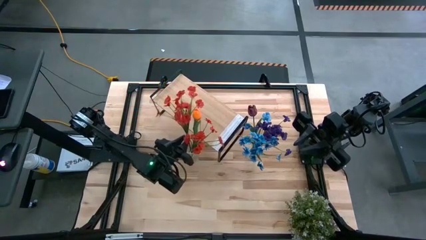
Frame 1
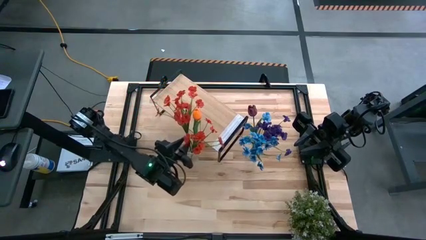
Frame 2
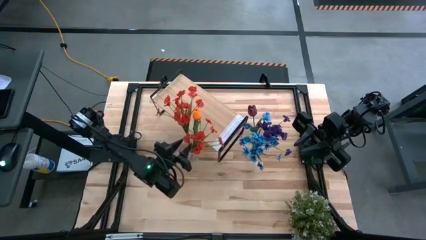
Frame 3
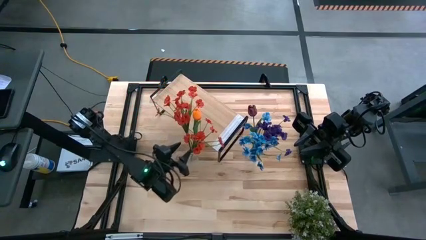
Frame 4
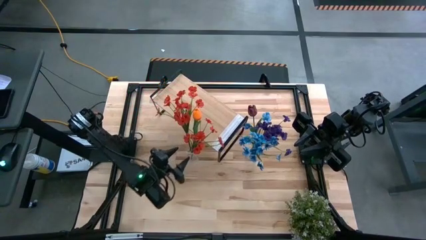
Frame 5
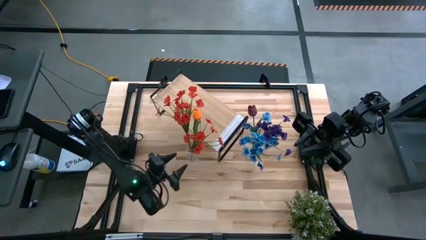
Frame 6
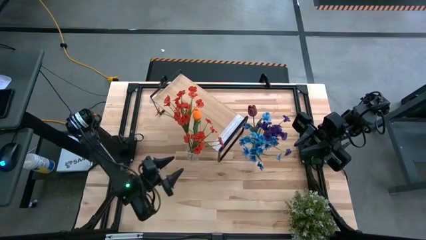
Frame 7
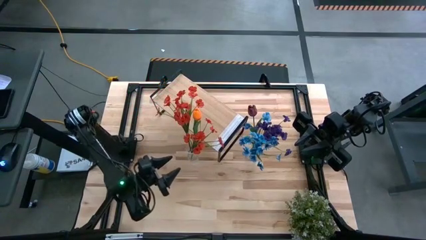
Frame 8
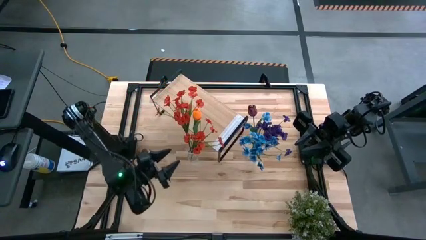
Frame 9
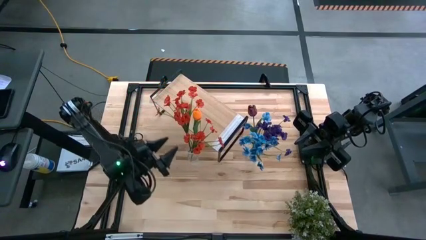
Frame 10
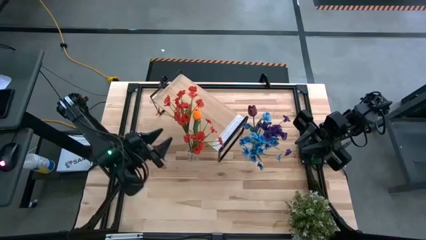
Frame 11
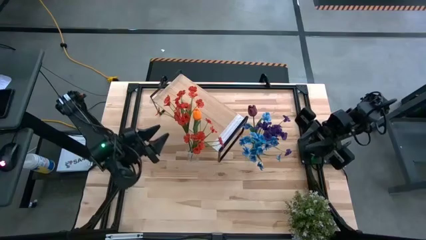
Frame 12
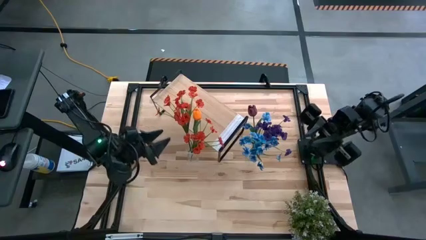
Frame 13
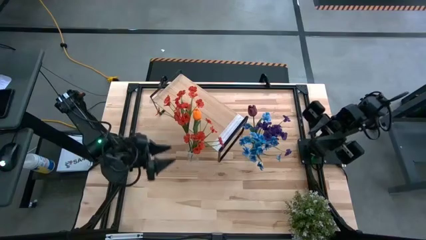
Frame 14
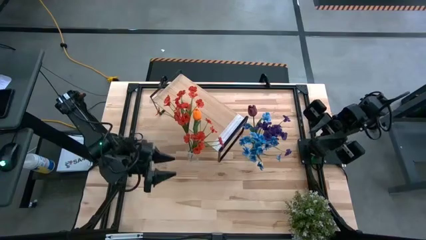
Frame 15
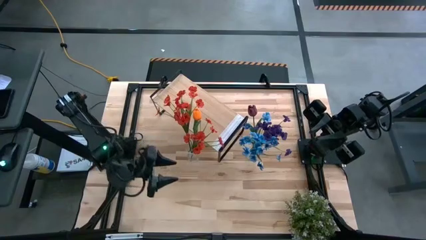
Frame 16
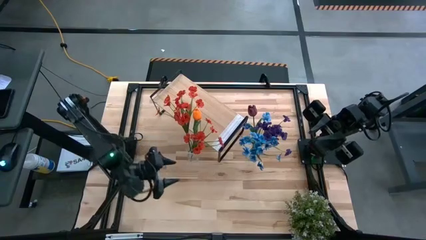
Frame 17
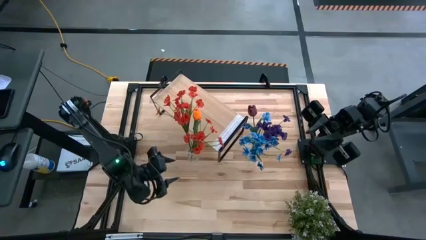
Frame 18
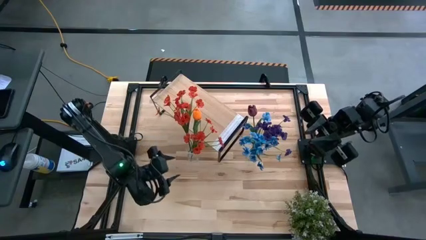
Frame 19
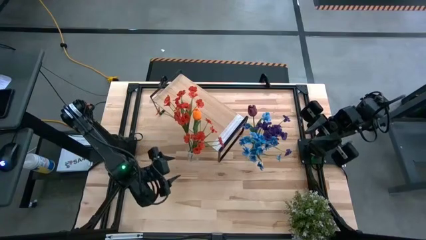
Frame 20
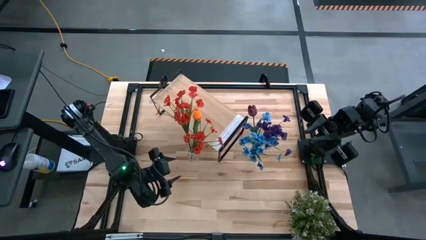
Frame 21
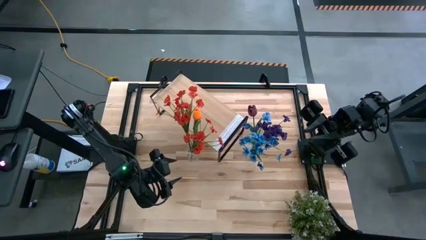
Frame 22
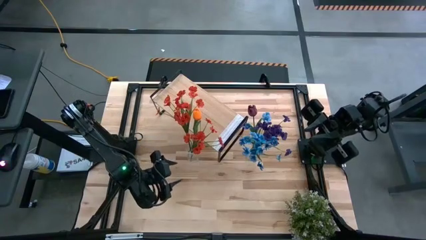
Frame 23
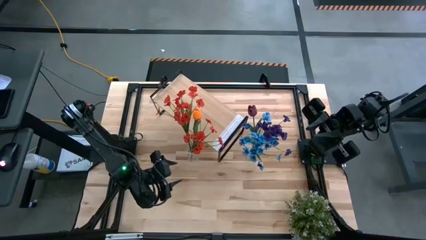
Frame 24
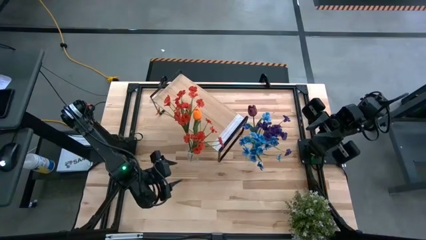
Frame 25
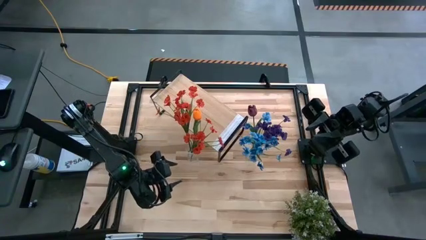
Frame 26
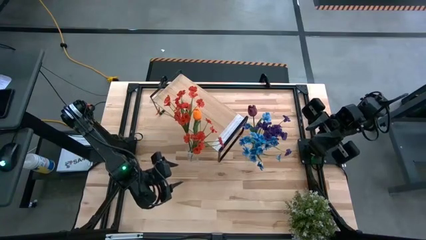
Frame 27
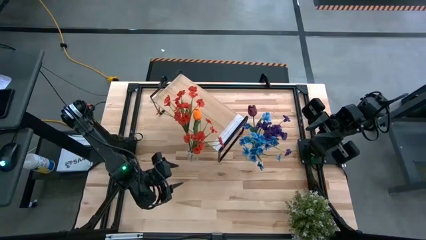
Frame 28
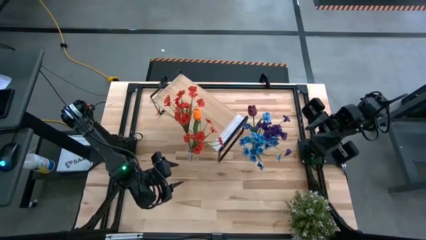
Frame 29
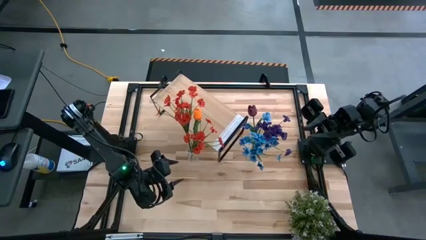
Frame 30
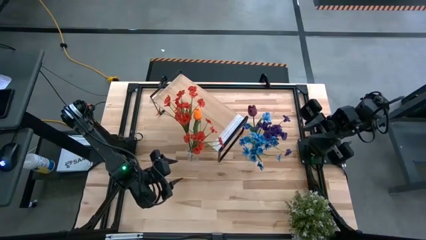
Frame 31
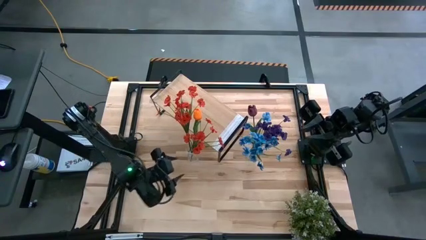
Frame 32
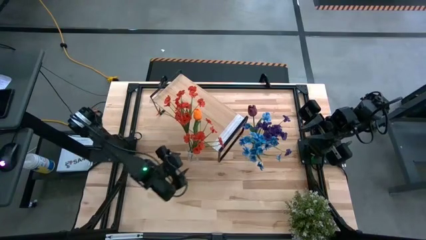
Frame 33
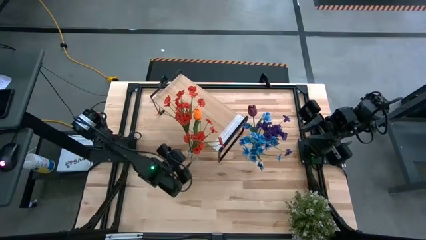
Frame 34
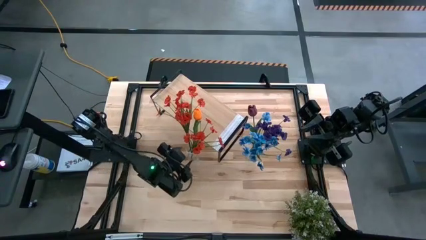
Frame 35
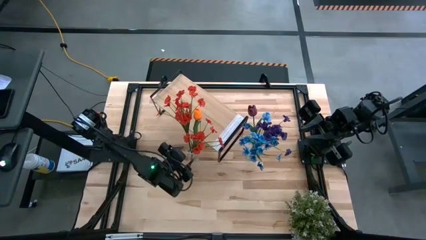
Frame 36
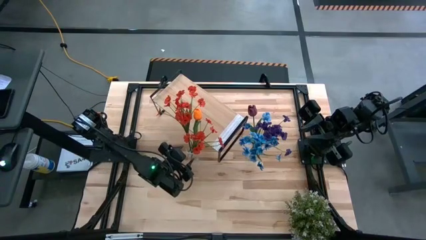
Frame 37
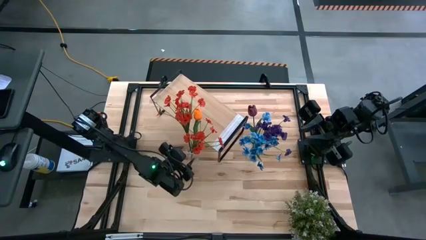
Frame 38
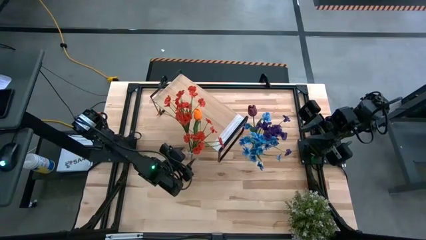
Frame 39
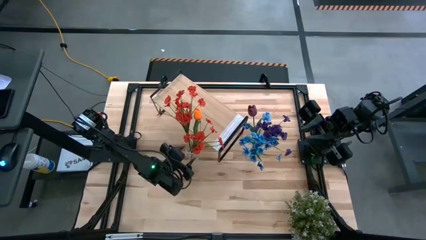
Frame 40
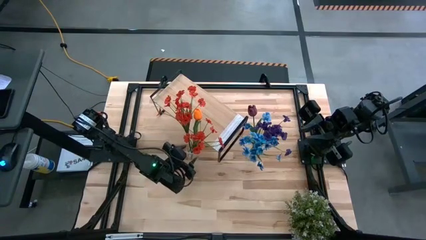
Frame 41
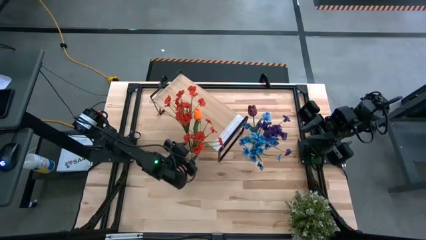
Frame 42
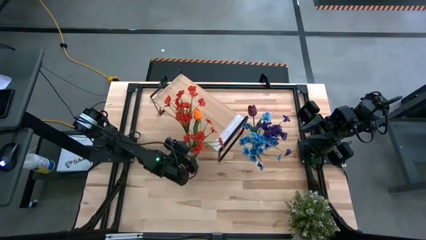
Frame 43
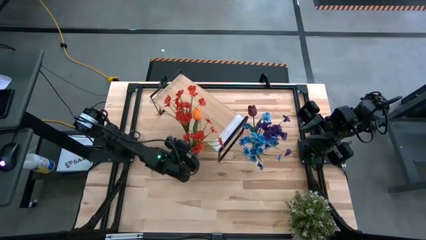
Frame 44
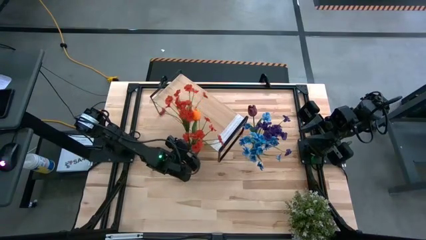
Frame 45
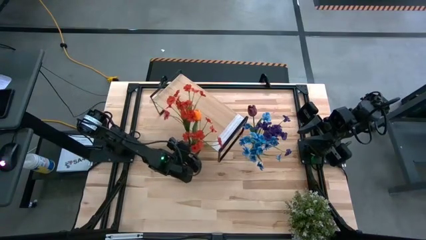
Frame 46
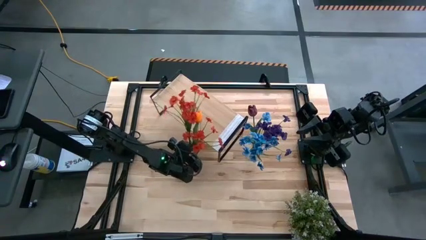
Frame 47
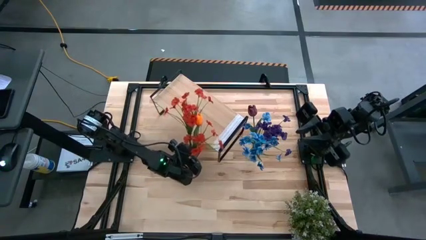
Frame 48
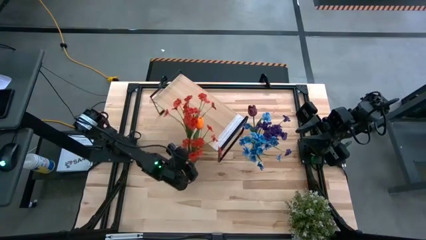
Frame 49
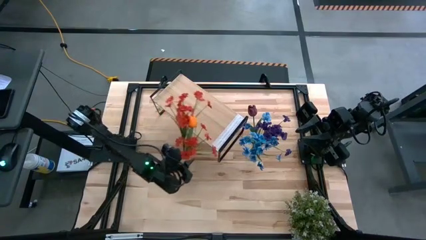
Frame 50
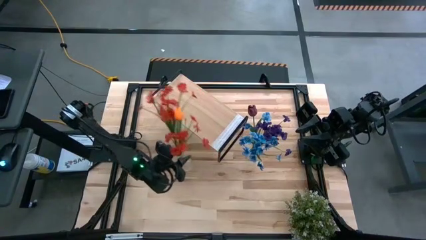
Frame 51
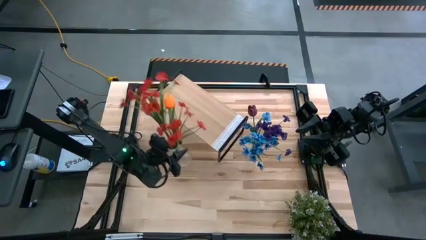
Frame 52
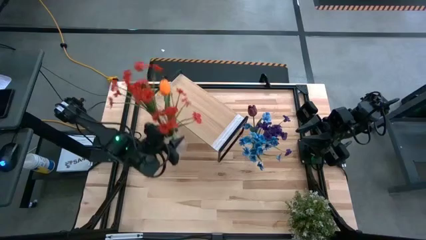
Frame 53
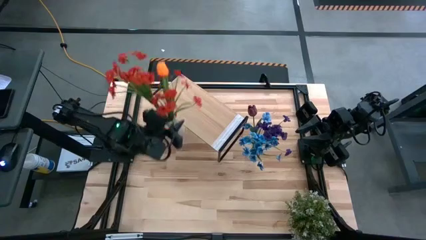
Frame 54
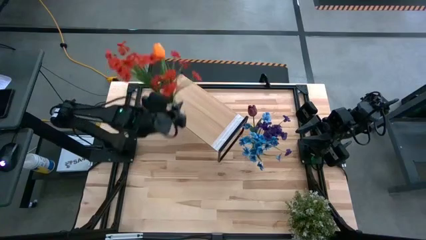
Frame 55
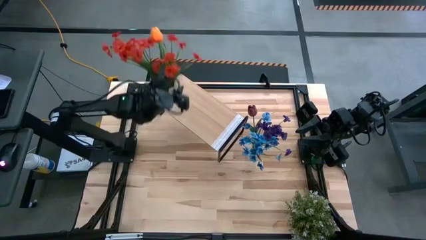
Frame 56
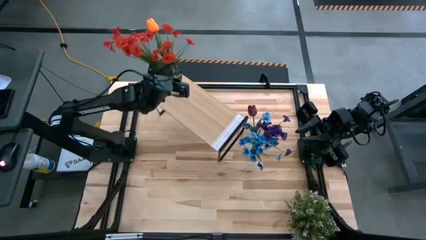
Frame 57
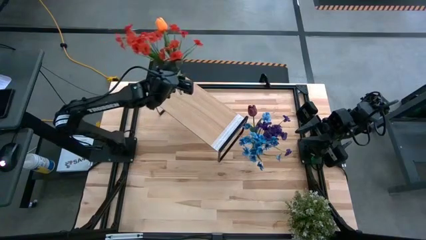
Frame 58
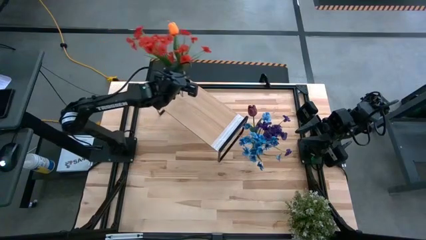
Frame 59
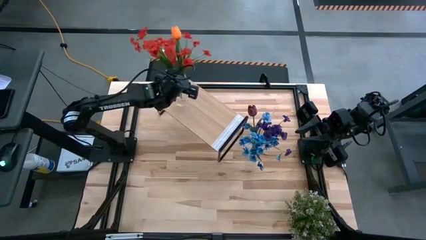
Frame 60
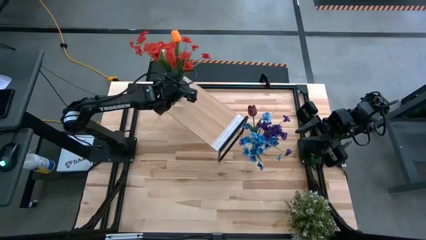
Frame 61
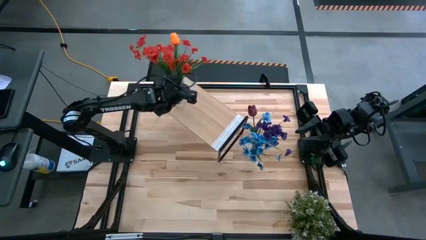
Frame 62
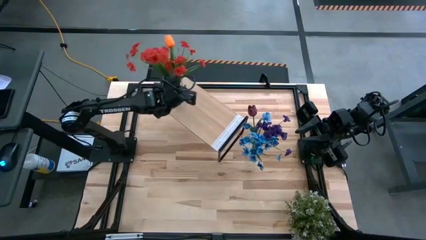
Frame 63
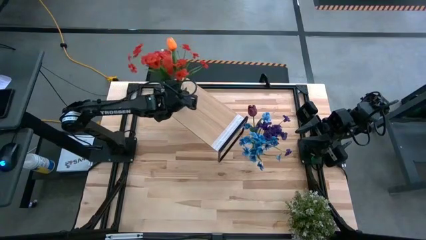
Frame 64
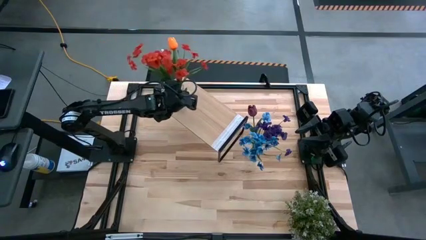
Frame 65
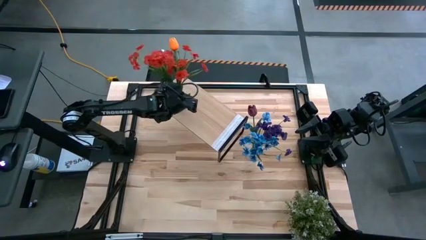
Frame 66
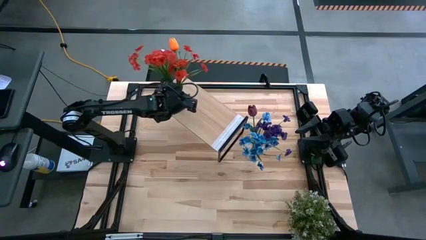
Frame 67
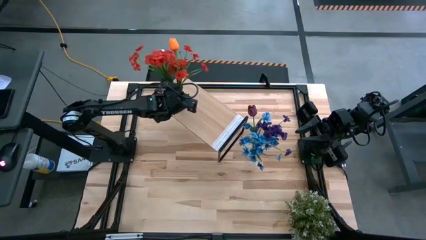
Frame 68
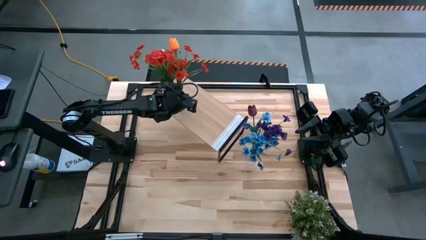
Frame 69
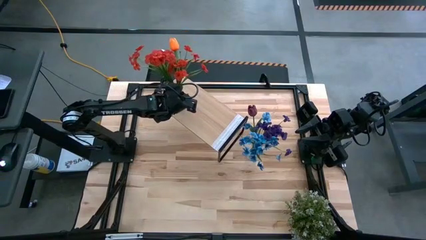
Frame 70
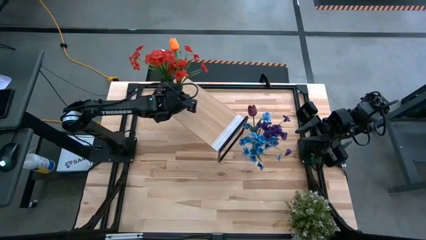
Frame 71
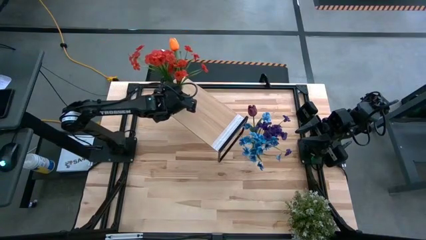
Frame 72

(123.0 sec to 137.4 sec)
Task: Pick and place flowers into a vace then onto a shelf
Put the left transparent flower vase with flowers on the shelf

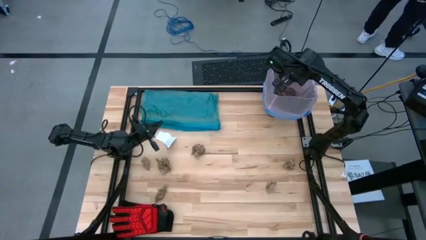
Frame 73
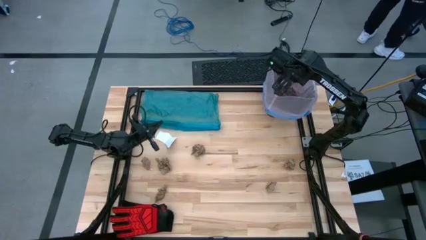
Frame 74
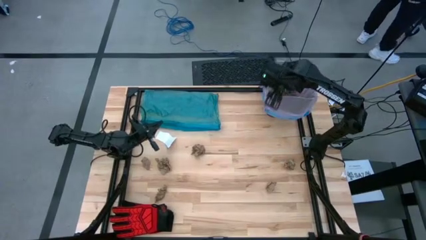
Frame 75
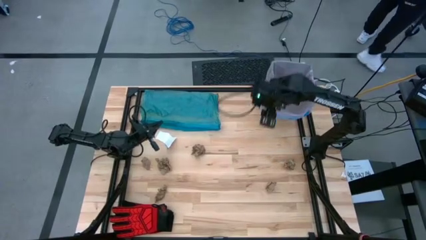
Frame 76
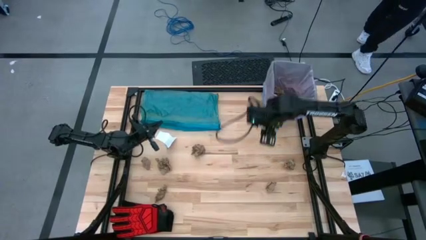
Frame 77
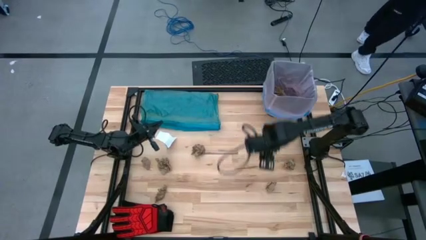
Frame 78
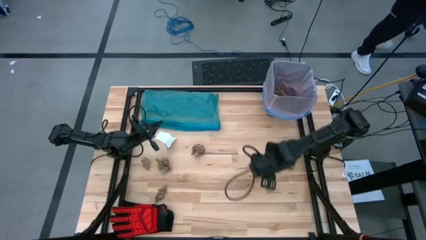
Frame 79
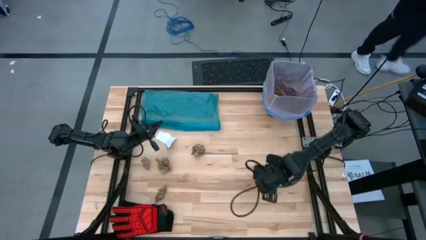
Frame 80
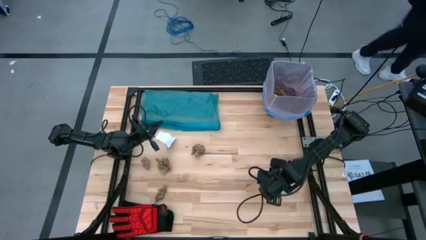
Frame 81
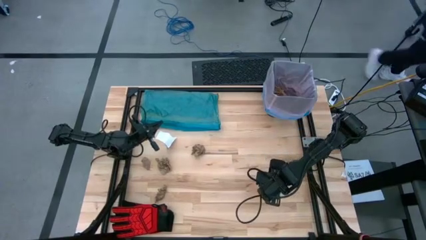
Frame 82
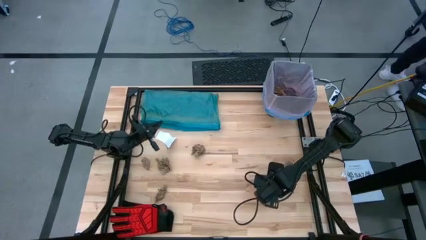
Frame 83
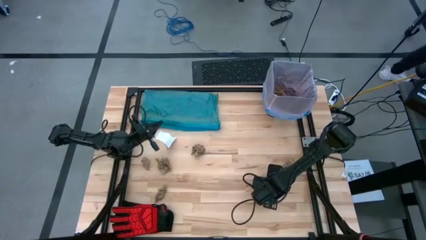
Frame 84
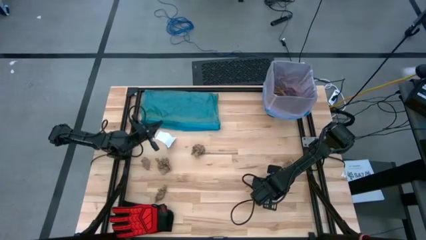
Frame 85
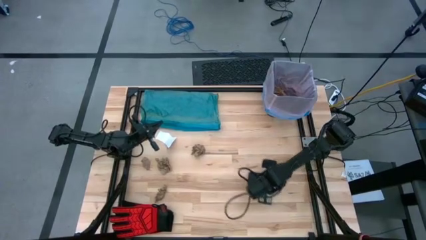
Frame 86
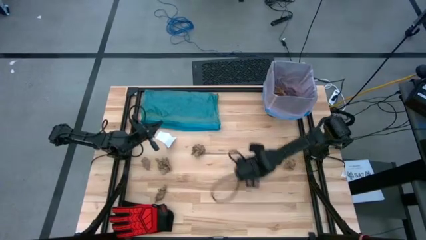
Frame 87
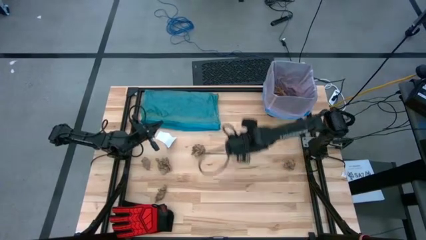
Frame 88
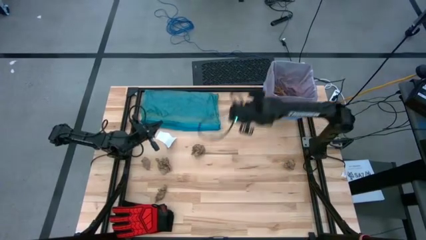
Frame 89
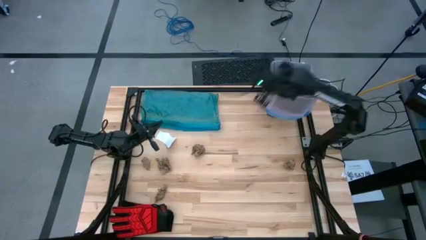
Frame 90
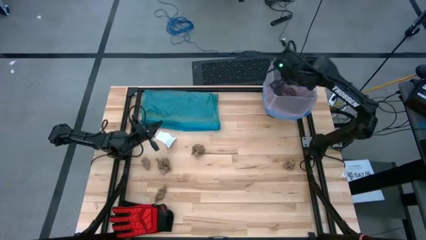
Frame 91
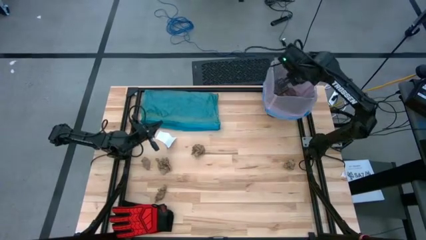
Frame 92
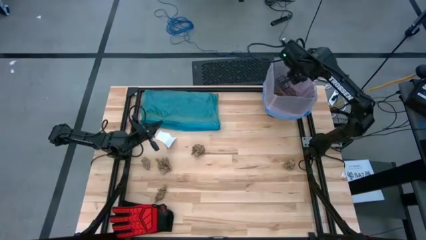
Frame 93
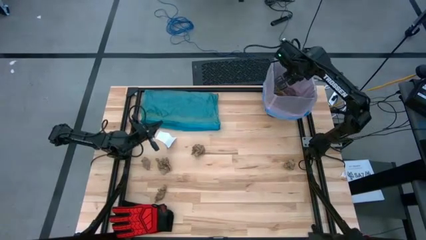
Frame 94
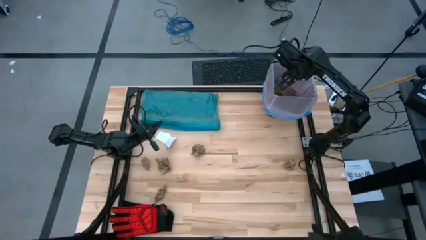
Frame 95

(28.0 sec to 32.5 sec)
Task: place trash/remove bag and relplace
Put the brown napkin into the trash bin
